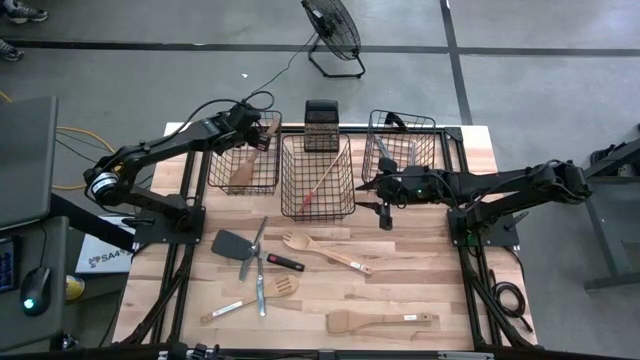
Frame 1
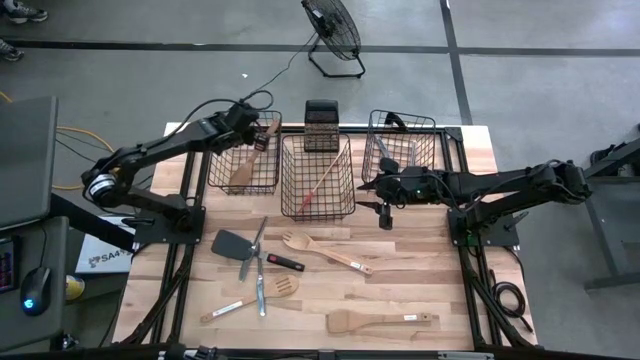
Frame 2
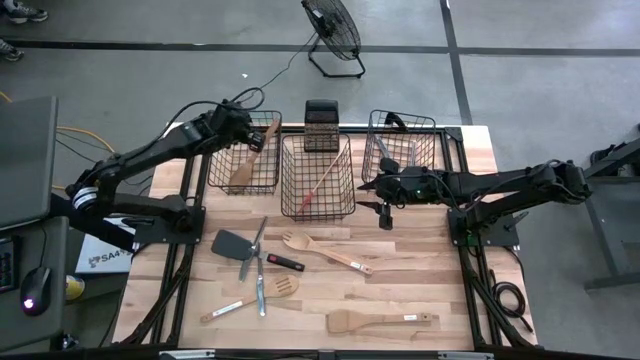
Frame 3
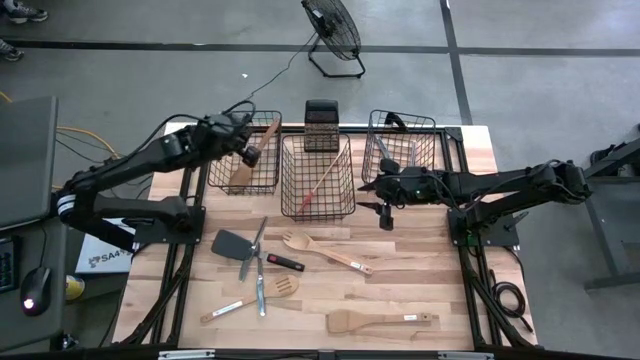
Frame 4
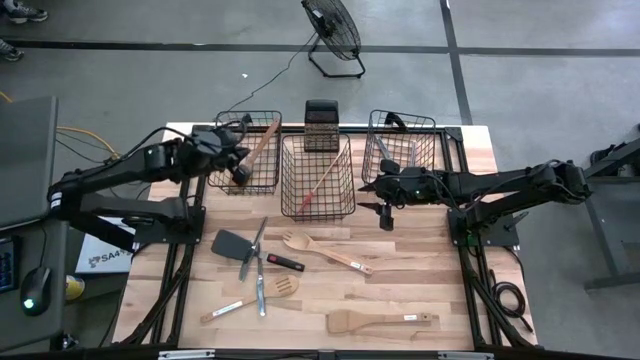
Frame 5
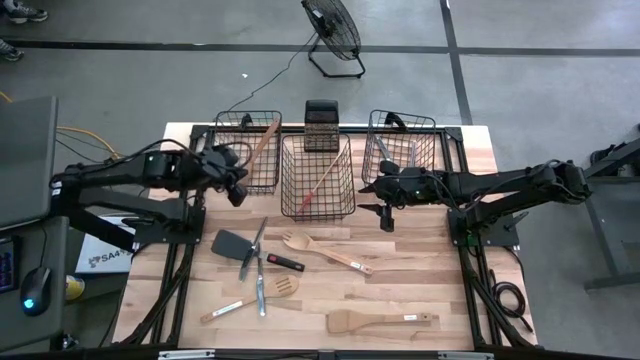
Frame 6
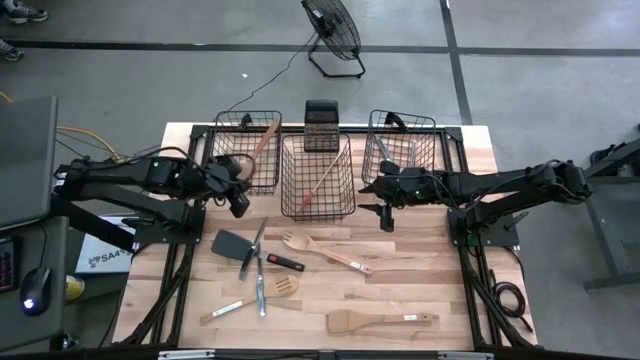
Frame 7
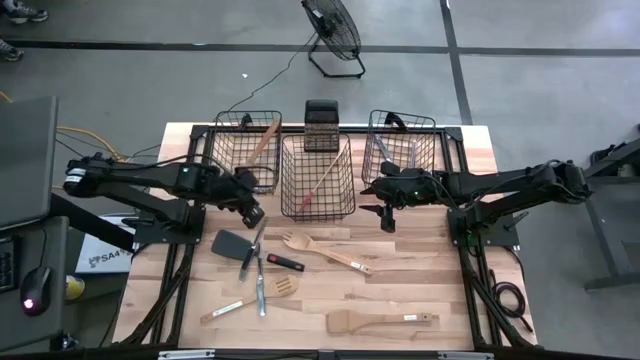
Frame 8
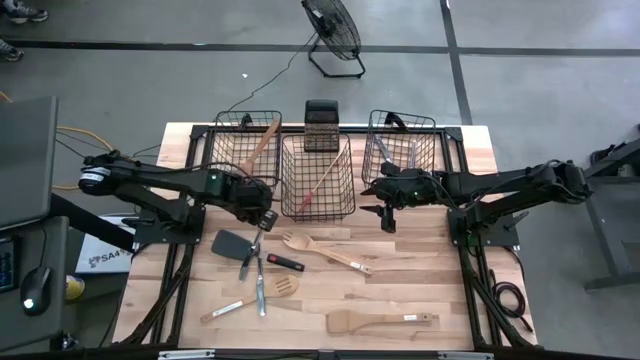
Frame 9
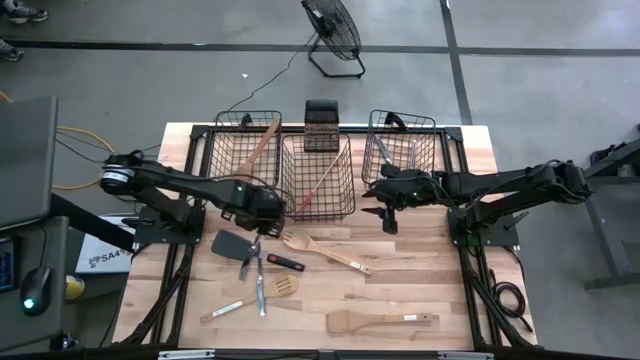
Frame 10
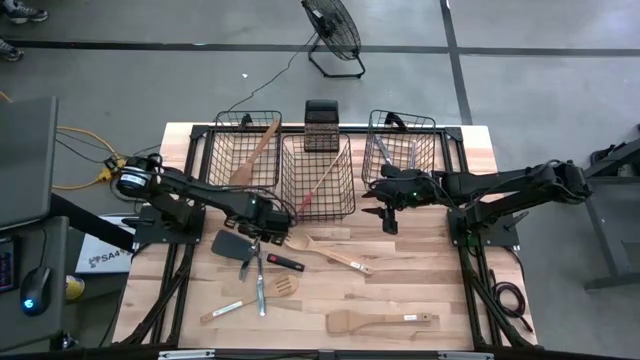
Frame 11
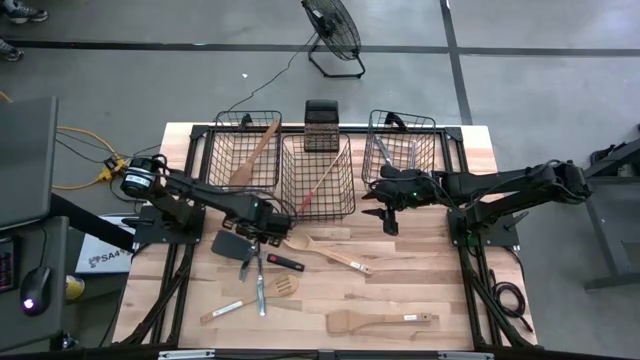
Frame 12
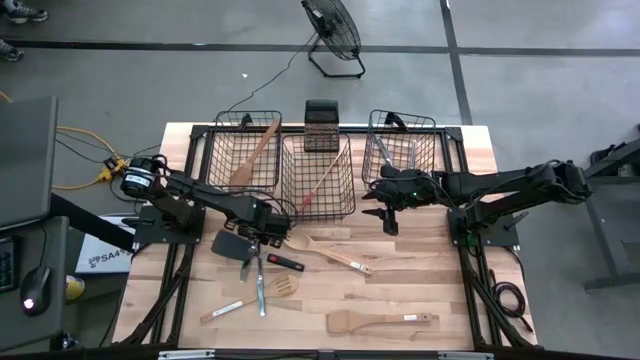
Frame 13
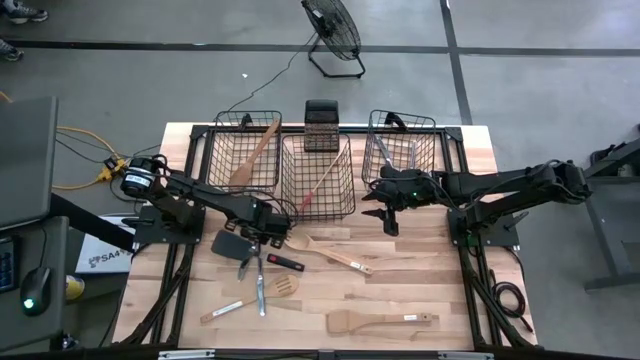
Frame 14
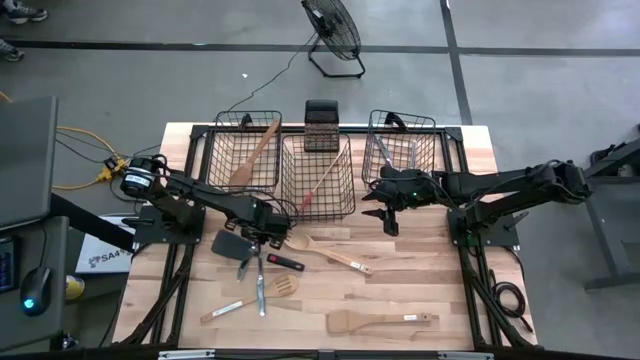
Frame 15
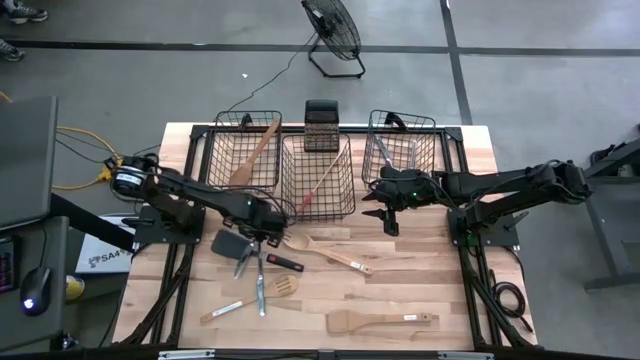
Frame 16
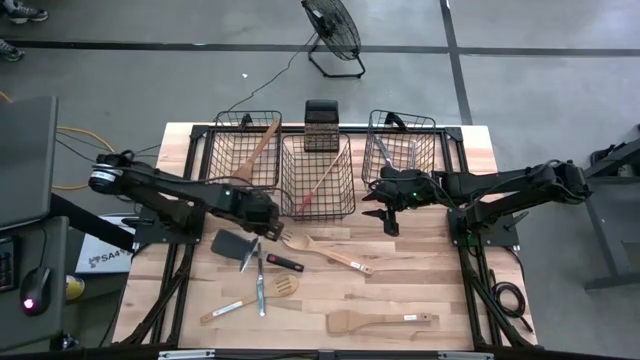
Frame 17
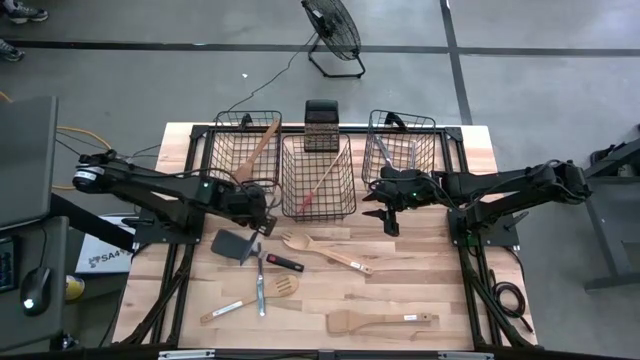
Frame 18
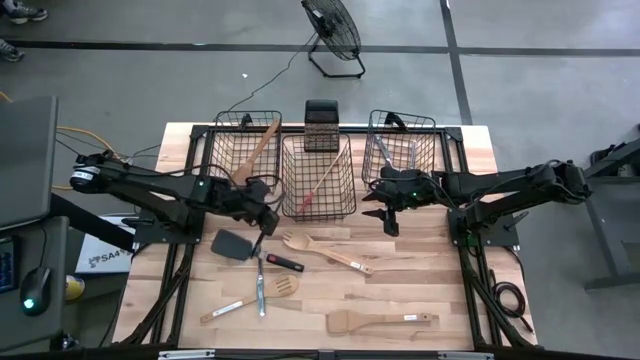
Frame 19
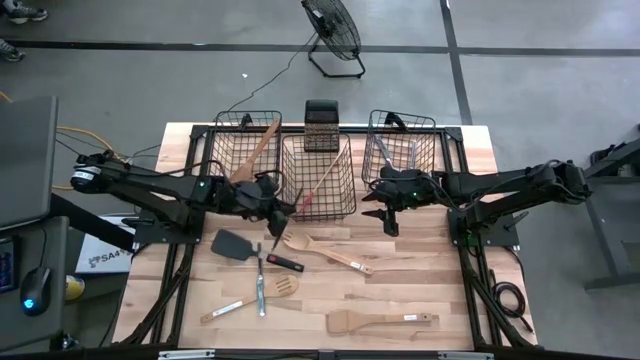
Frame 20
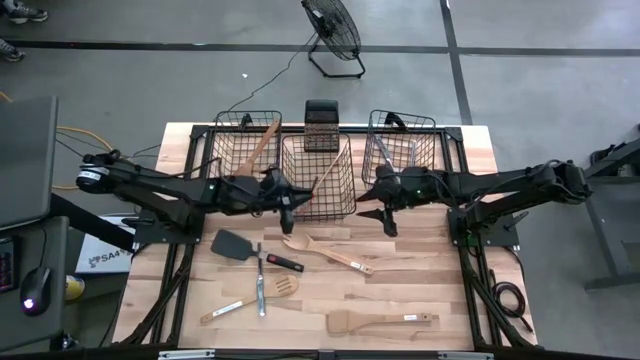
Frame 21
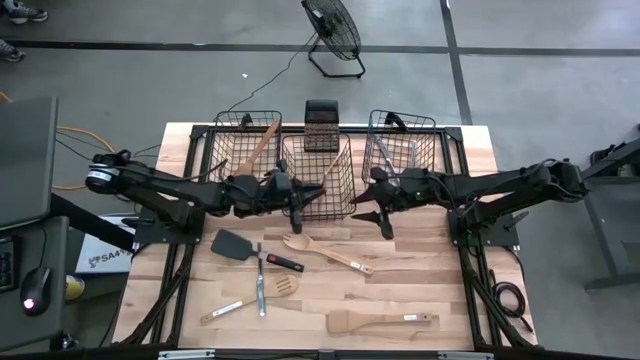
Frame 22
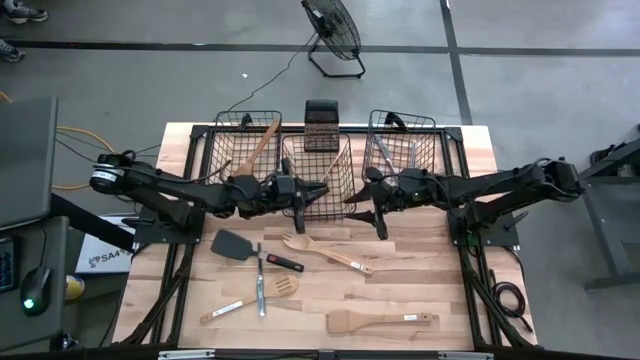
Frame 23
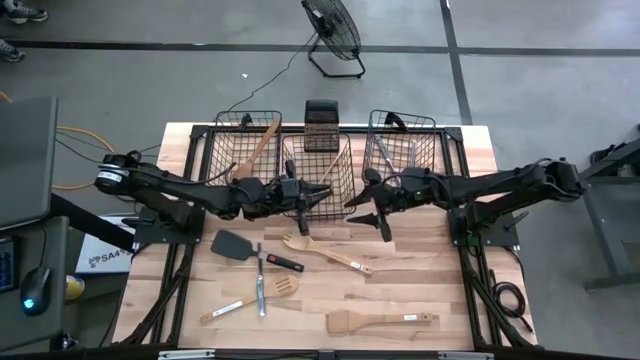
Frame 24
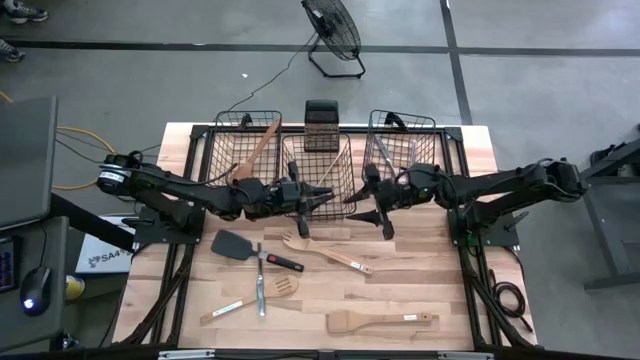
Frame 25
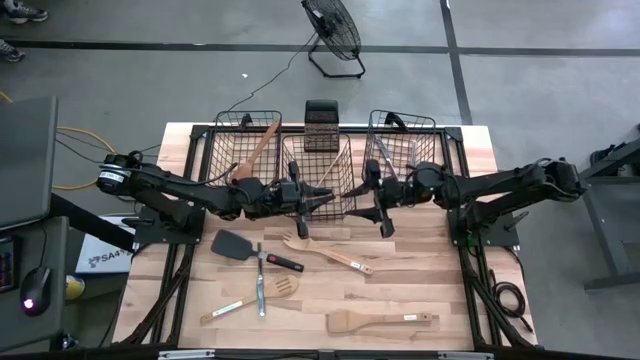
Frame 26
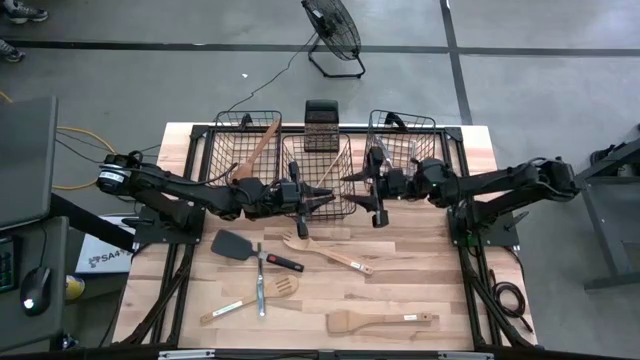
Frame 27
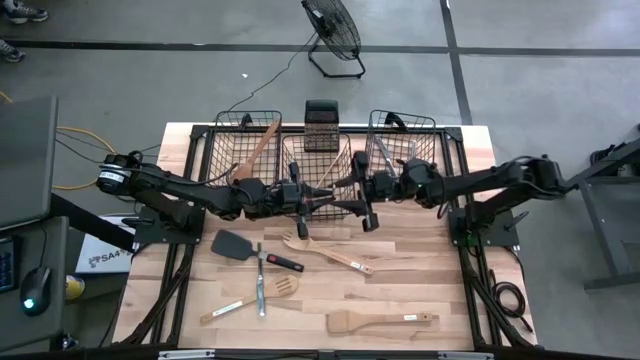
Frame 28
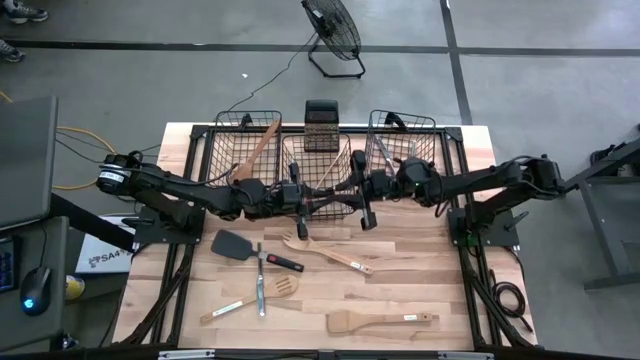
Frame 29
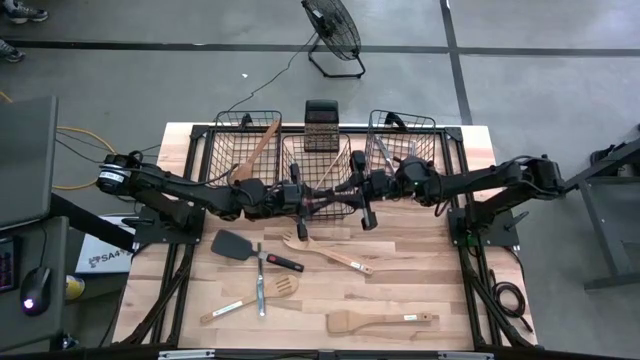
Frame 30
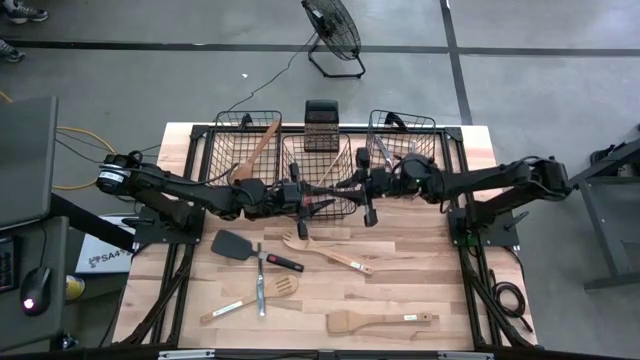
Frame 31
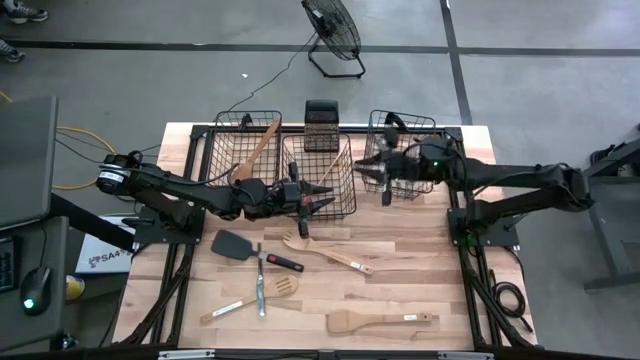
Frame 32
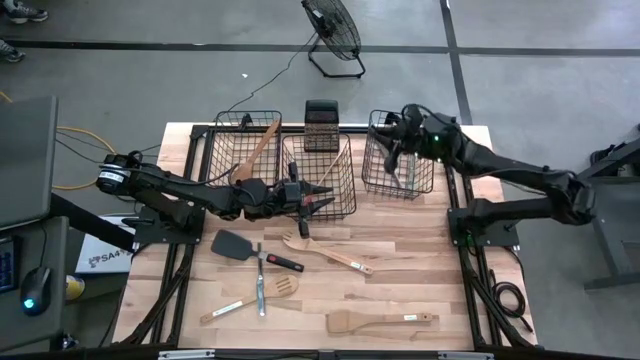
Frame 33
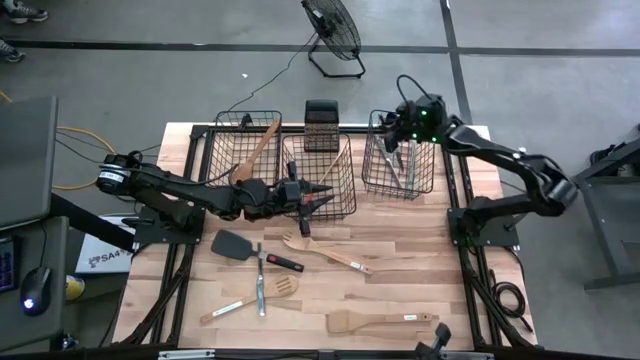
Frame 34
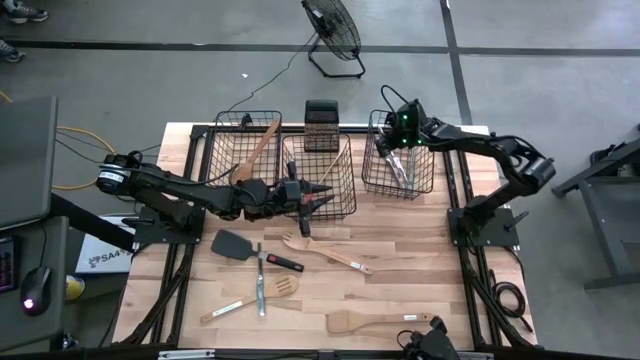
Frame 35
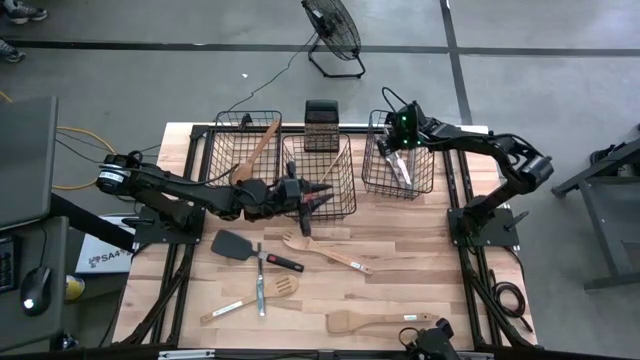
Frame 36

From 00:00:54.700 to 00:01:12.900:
Task: Pick & Place Kitchen Items
Put the silver table knife into the right wire basket

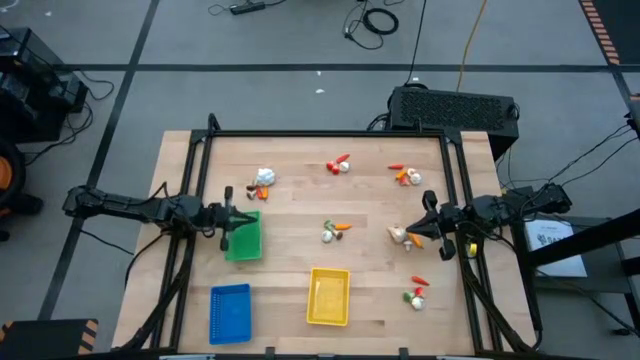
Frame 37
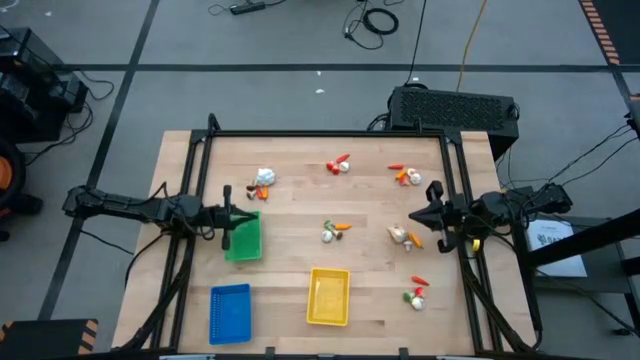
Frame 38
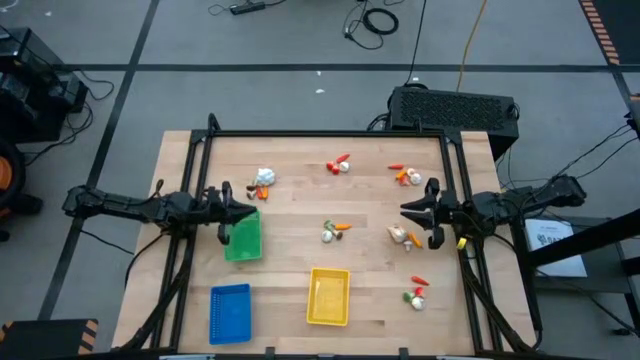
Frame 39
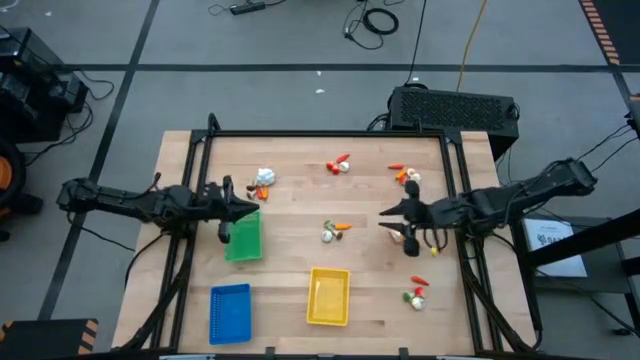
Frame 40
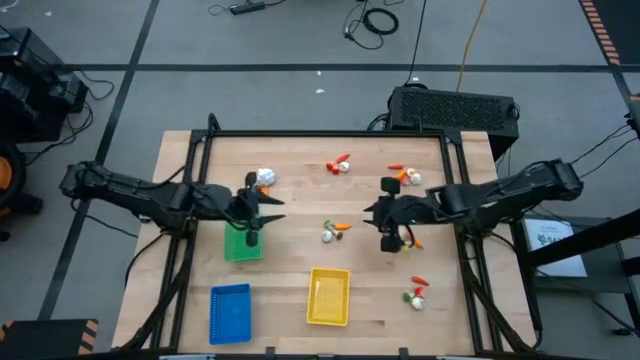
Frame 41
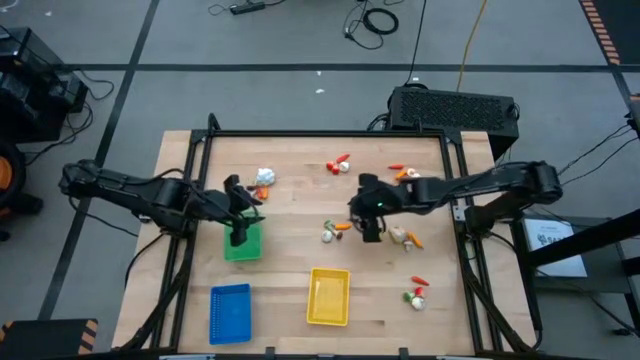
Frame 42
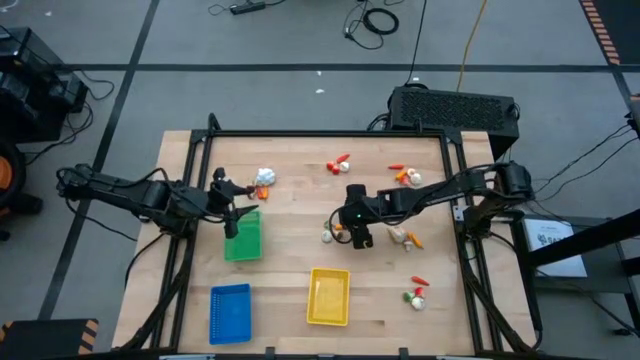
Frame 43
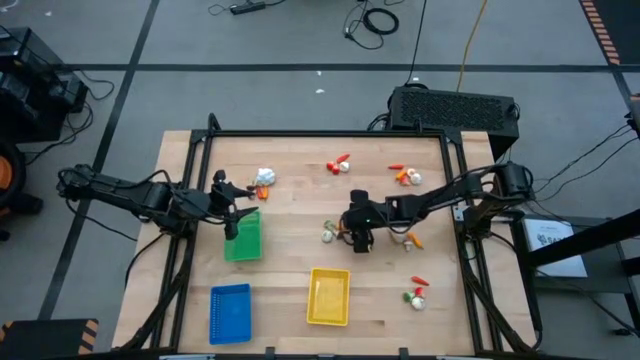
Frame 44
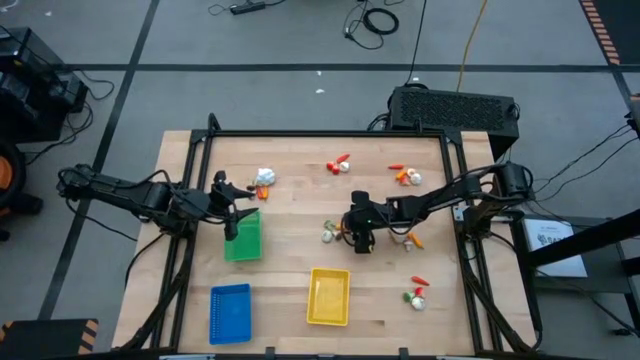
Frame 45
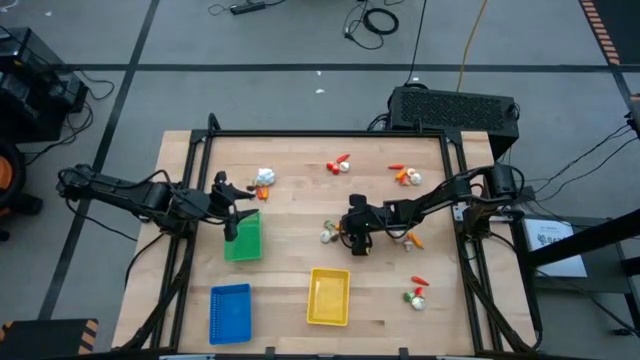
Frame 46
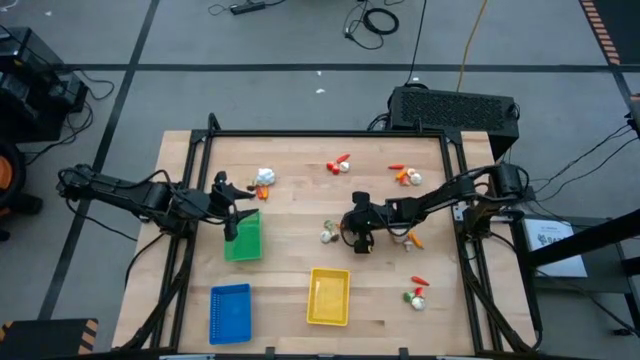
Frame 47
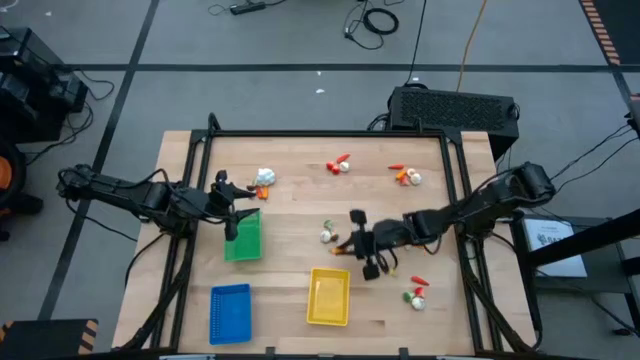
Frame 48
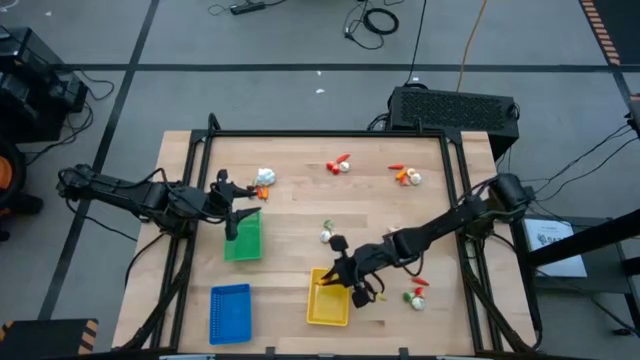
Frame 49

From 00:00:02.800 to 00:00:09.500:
Task: Sort produce into baskets
Put the yellow chili pepper into the yellow basket
